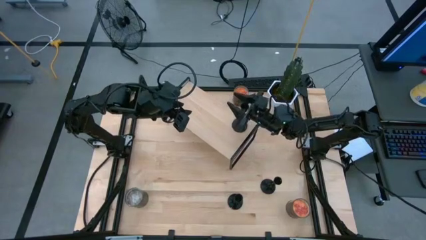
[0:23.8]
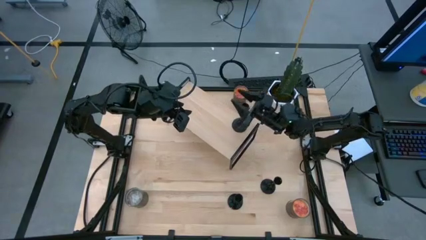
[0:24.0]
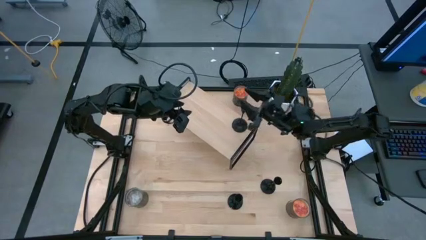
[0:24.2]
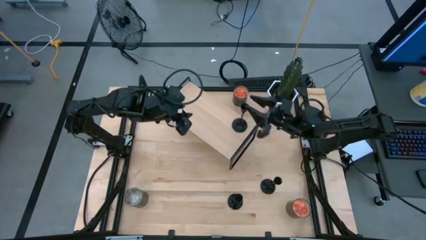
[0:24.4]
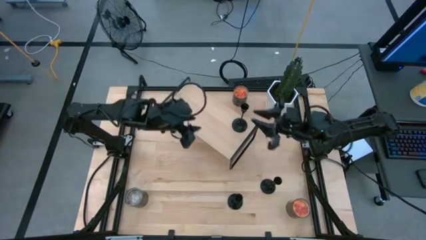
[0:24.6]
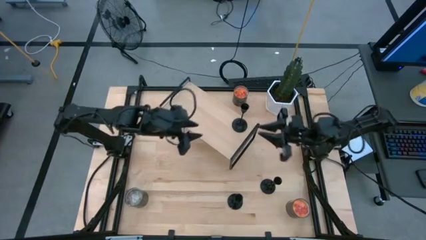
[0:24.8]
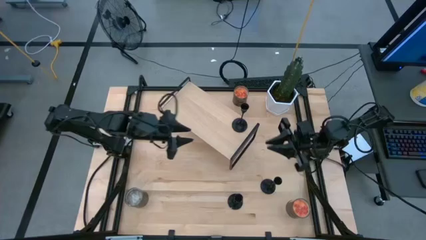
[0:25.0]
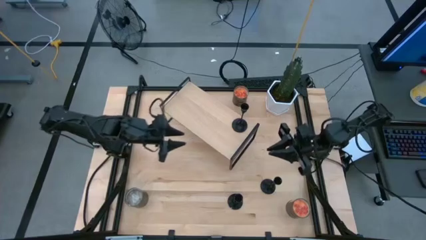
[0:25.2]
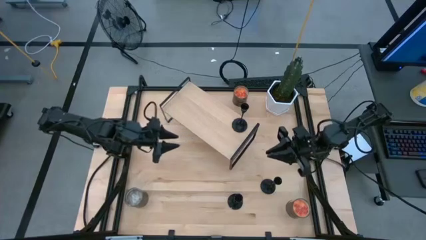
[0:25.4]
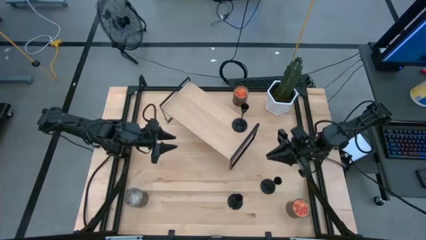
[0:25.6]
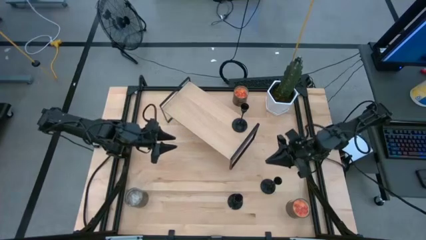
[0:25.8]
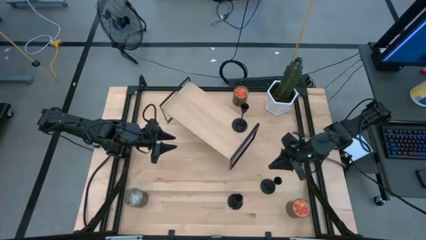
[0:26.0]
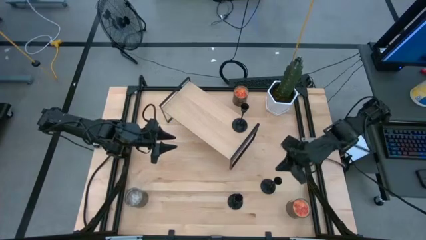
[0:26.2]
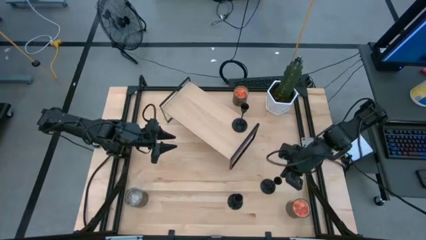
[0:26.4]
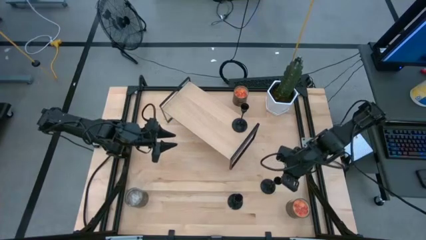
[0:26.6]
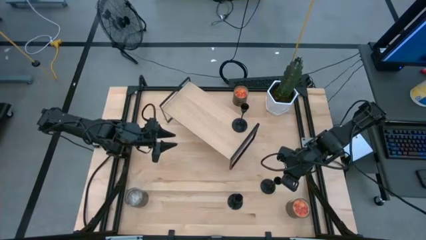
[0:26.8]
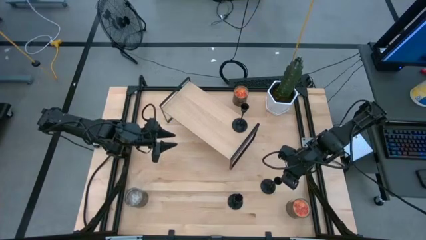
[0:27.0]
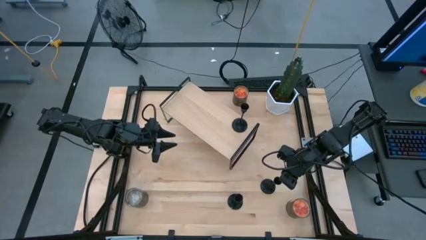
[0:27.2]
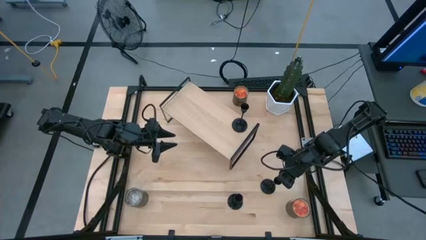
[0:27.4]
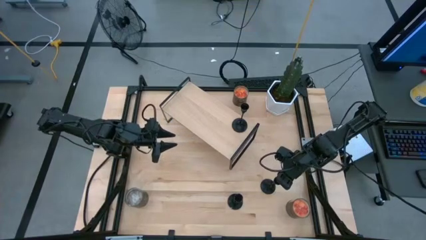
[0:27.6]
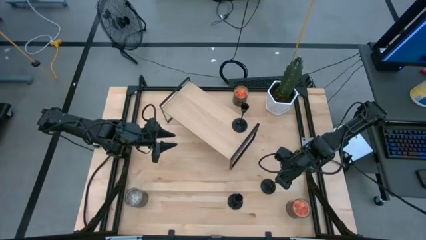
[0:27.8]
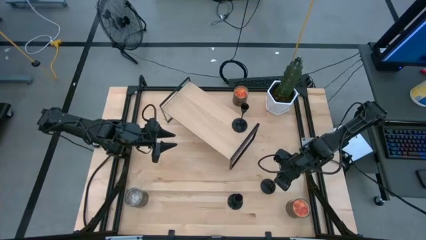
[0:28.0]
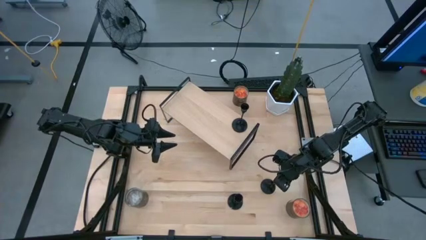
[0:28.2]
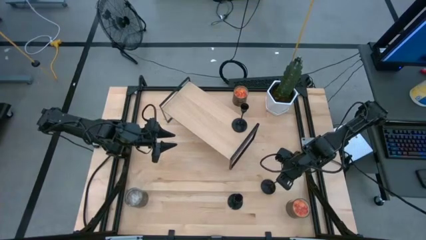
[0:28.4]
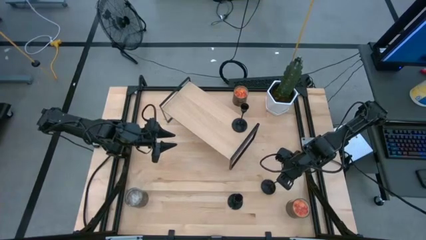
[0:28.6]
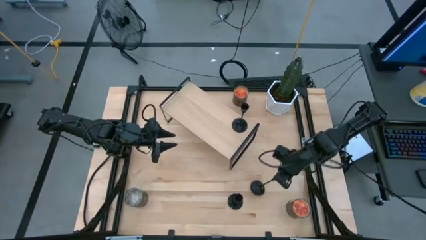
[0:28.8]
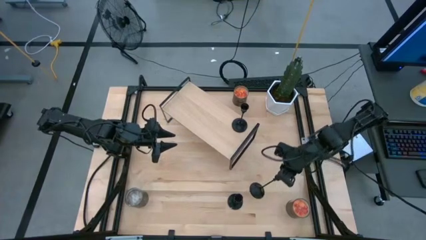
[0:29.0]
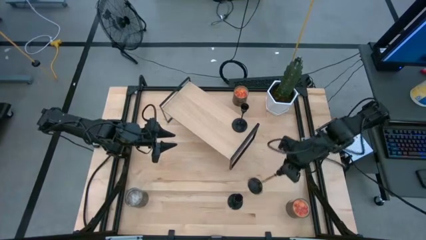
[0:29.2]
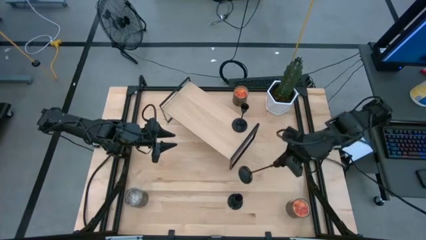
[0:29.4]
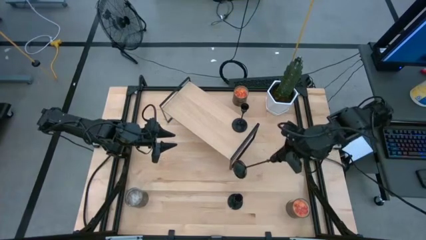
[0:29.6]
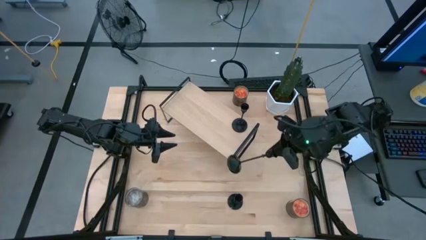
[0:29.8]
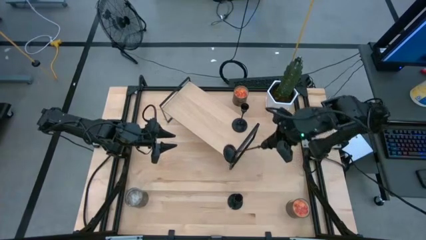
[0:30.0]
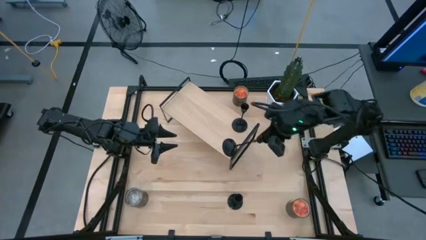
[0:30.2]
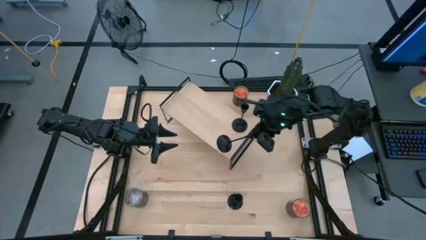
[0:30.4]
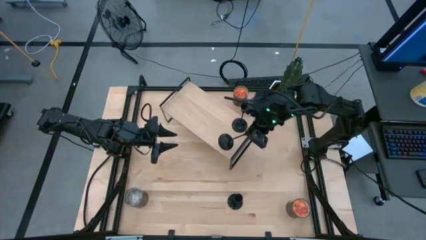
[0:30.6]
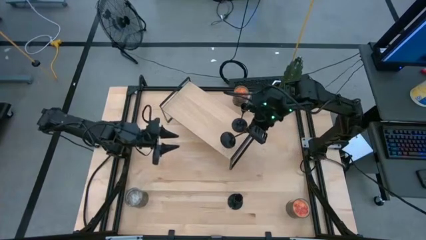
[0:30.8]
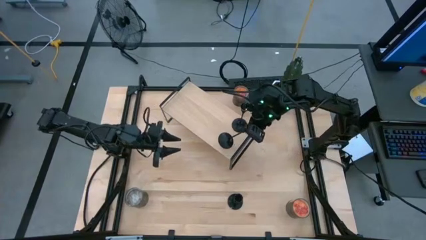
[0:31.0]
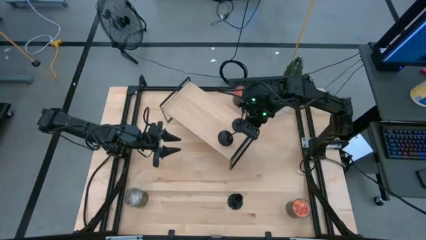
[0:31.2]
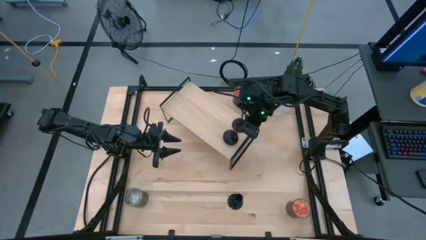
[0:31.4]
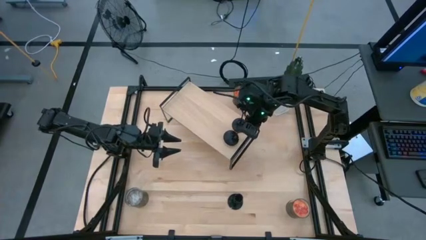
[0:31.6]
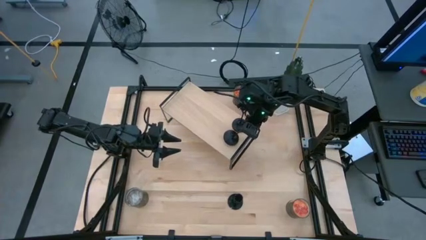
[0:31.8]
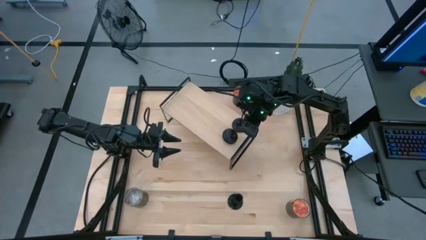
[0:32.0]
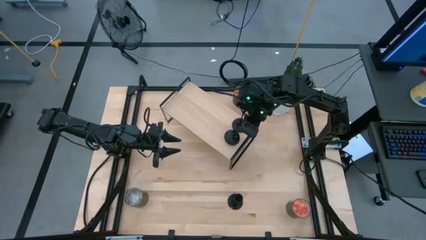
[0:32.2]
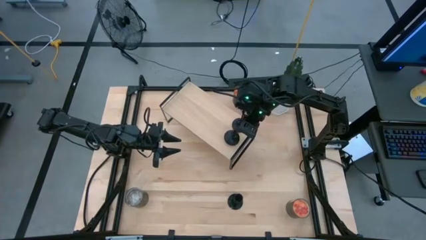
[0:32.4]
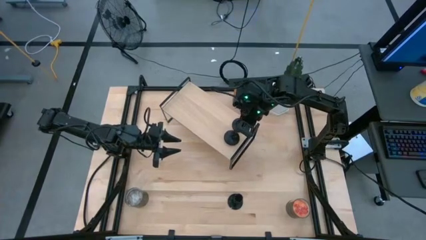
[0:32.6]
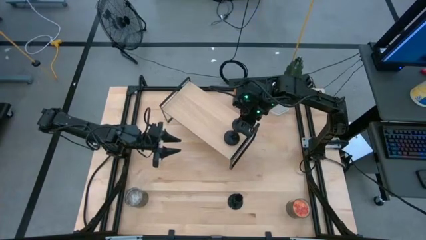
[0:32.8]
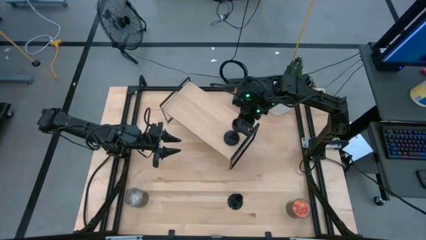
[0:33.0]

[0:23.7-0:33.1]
Task: Pick & Place candle stick holders
Put the top black candle holder on the shelf

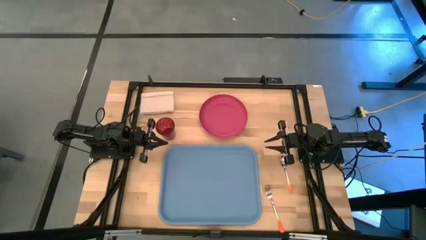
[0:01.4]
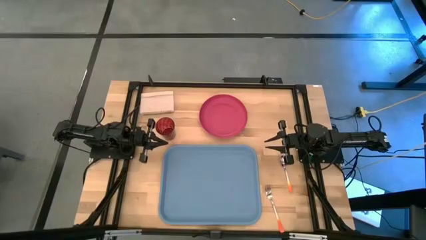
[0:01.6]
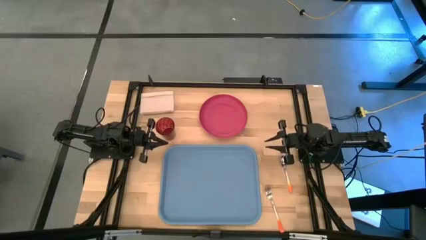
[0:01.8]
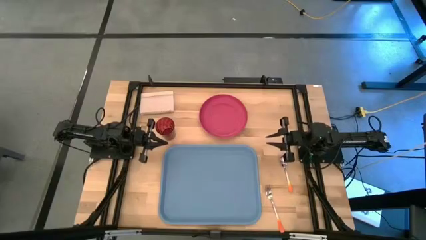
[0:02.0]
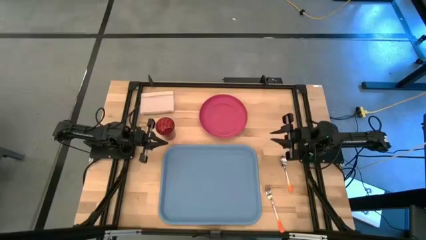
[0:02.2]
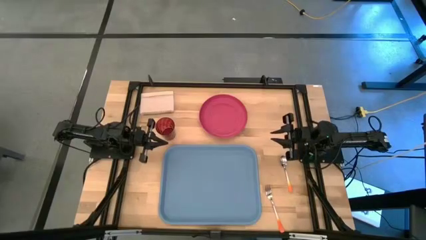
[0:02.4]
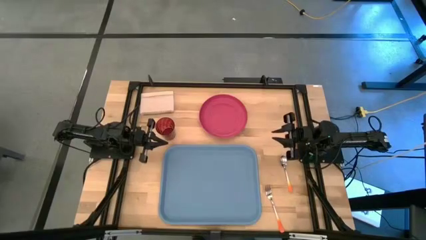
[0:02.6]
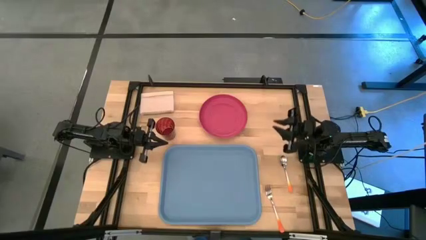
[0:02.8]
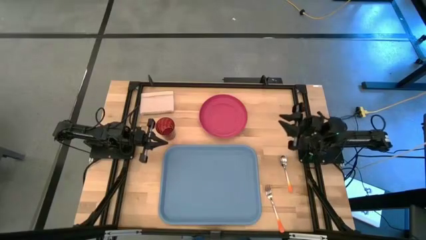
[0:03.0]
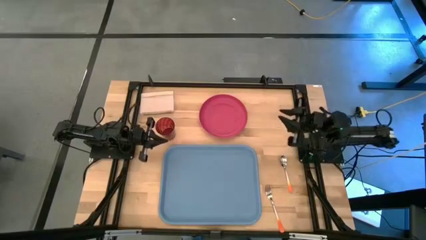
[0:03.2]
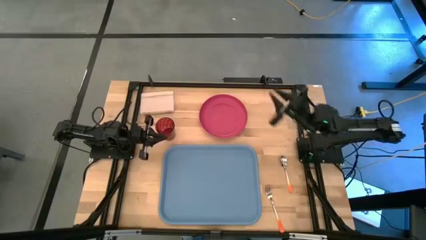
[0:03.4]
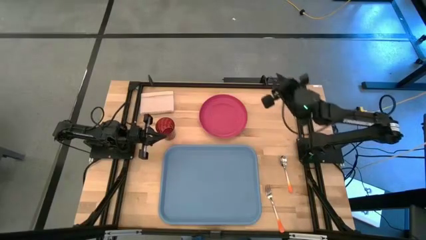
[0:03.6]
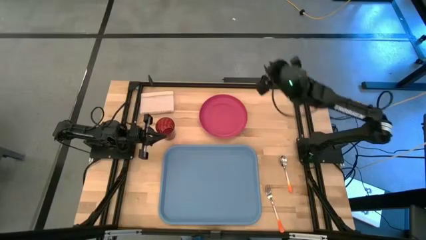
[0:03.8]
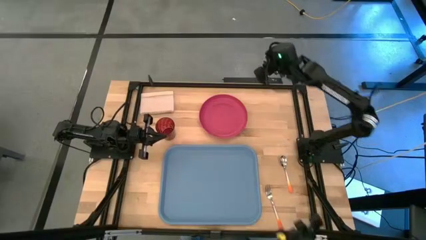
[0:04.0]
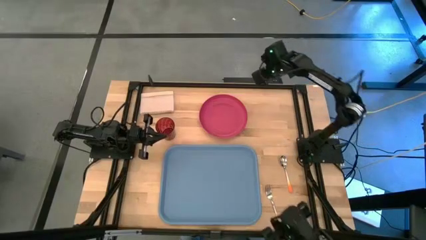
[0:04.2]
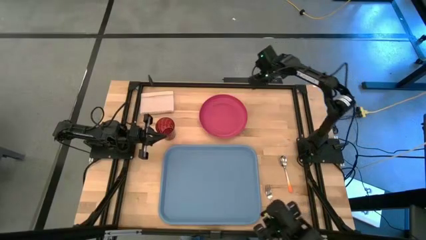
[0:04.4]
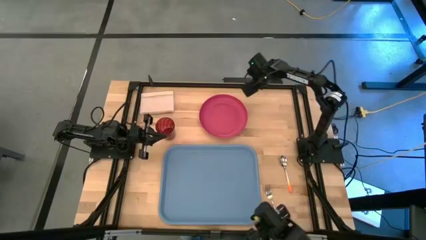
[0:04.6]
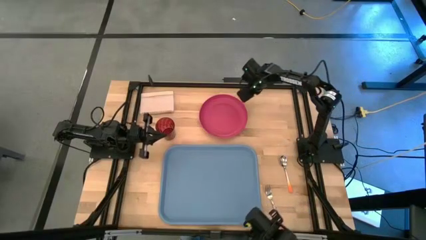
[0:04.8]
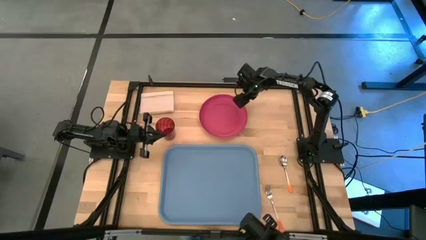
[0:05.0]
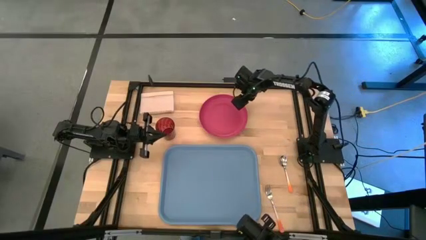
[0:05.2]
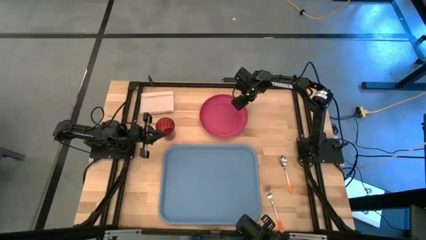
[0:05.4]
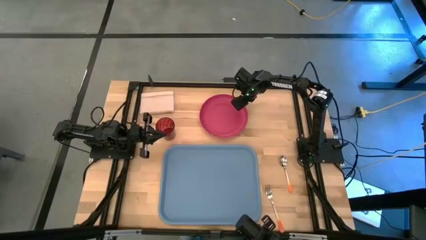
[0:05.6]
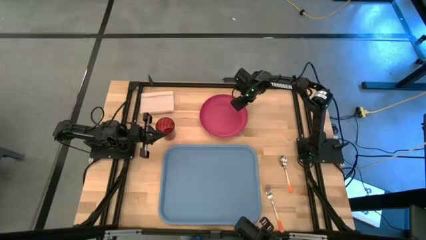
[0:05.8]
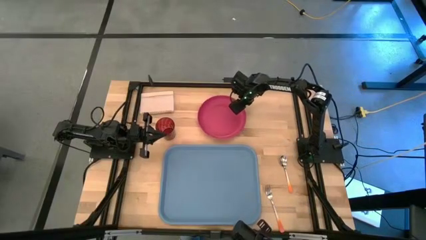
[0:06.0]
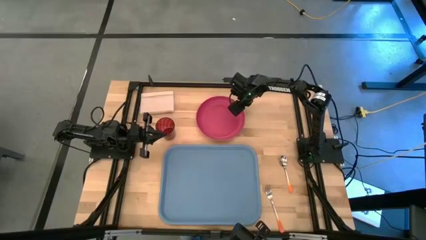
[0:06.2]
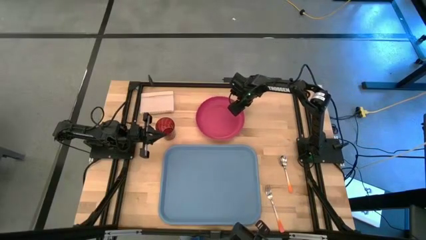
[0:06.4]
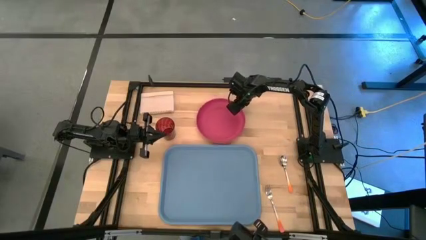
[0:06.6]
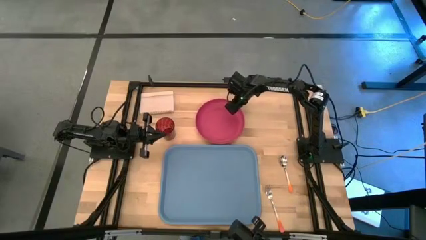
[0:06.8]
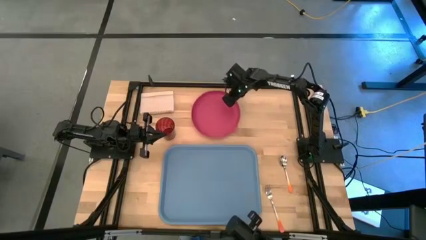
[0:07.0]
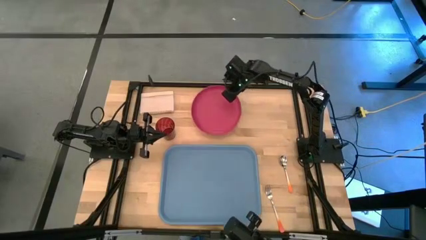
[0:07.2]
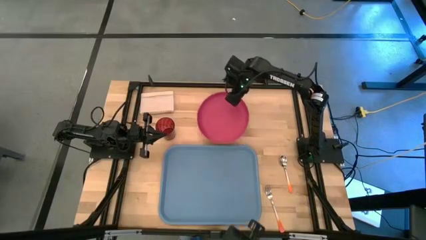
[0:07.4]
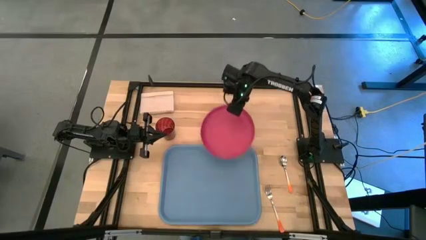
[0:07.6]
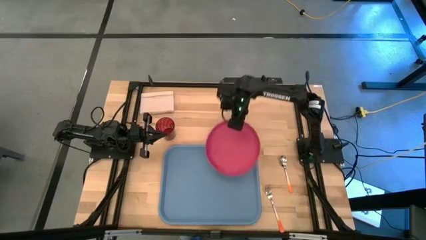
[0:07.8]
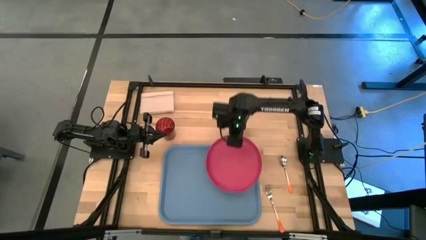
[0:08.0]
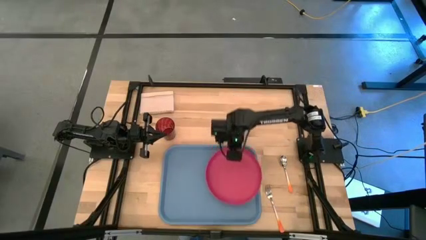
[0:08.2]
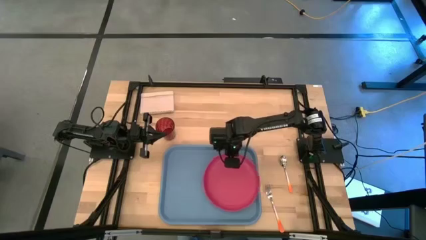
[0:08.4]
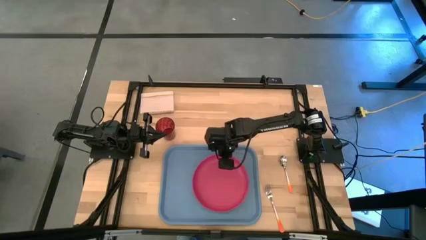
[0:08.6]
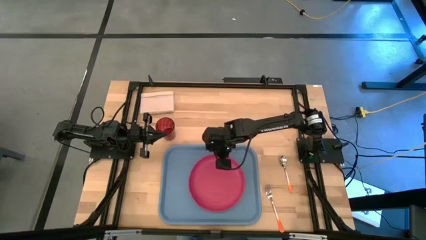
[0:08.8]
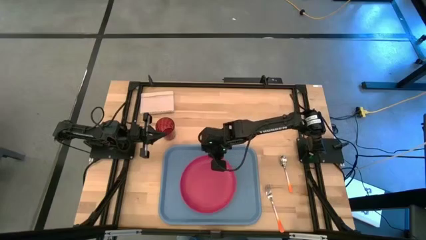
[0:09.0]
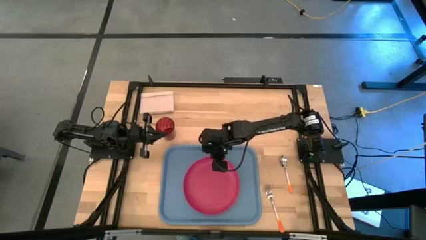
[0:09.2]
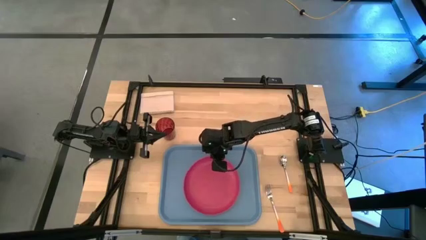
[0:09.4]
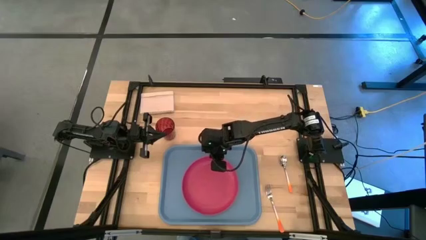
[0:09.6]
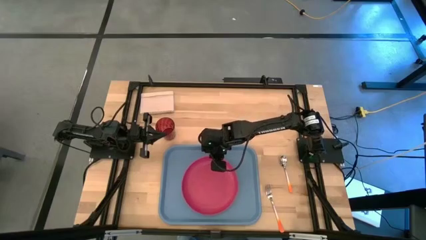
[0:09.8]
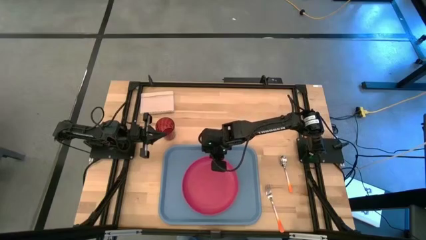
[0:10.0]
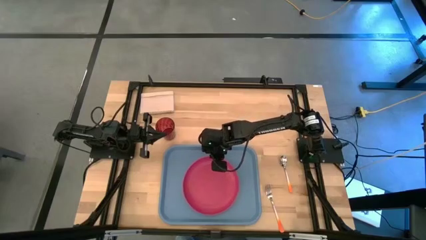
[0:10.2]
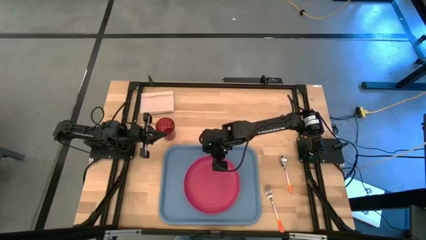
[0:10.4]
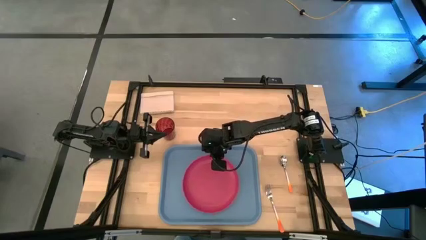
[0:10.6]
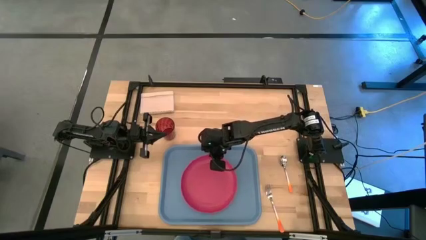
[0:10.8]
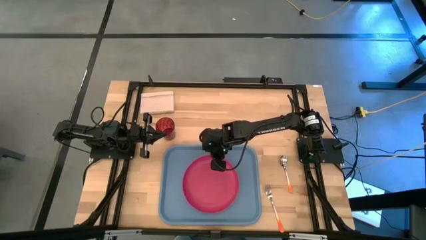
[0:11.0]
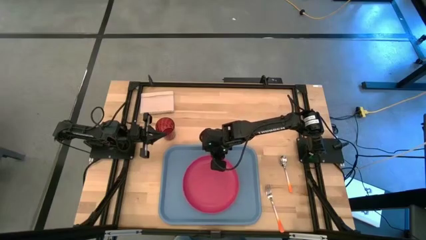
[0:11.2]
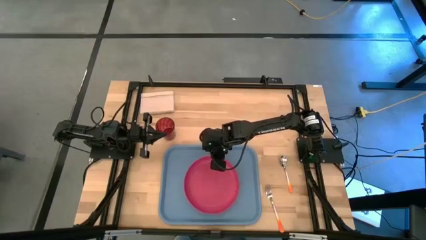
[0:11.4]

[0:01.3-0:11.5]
Task: Pick and place plate/cup/fork/spoon on tray
Put the red plate on the blue tray
